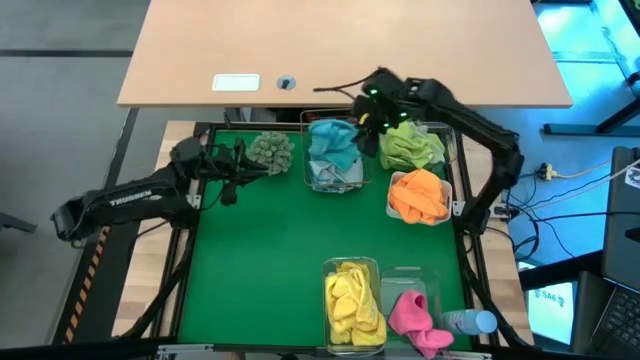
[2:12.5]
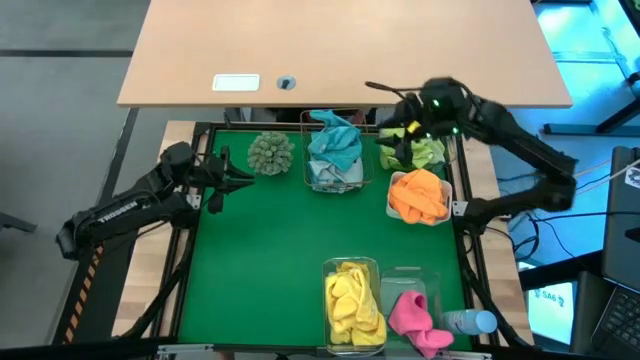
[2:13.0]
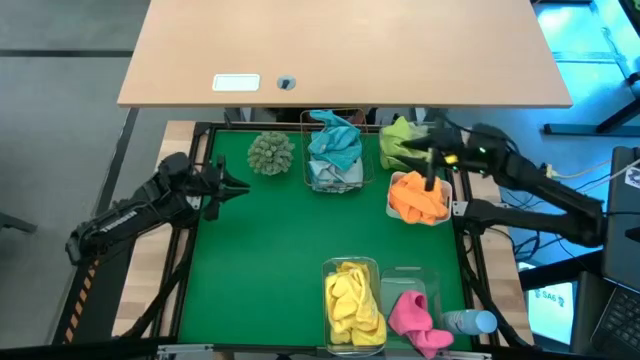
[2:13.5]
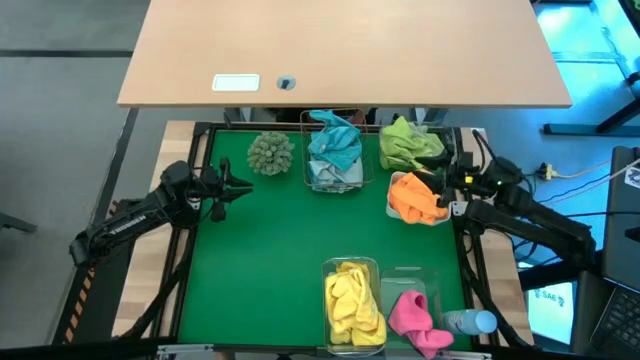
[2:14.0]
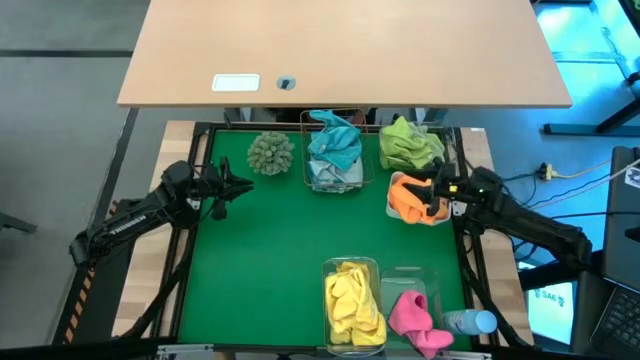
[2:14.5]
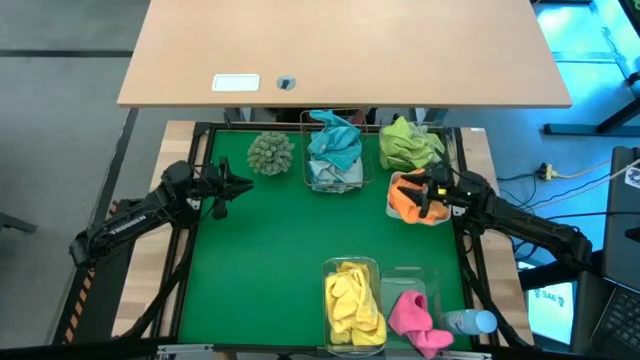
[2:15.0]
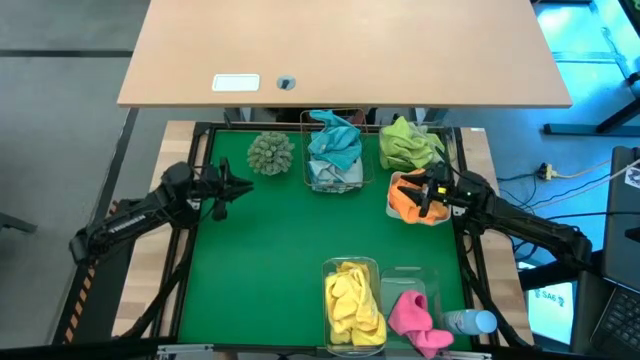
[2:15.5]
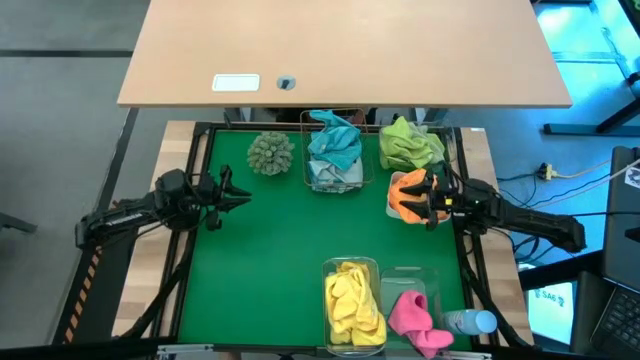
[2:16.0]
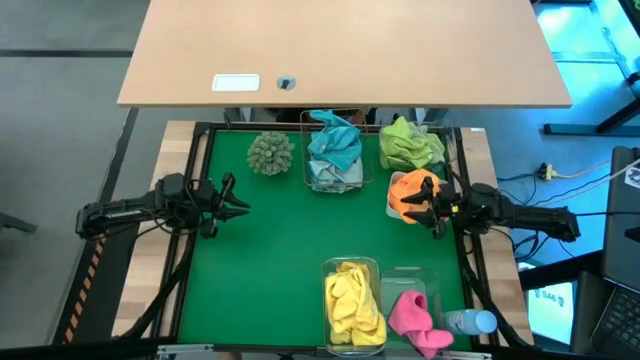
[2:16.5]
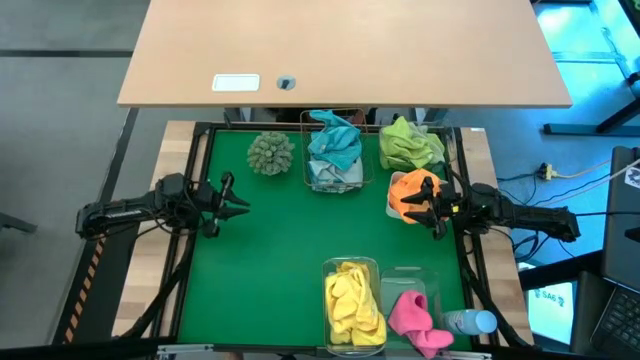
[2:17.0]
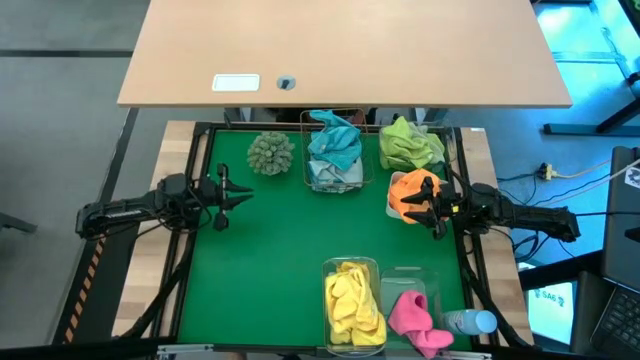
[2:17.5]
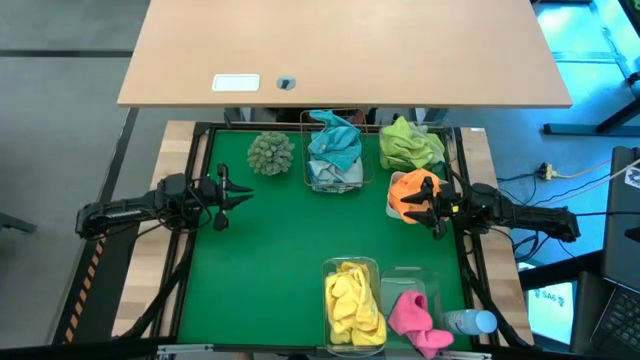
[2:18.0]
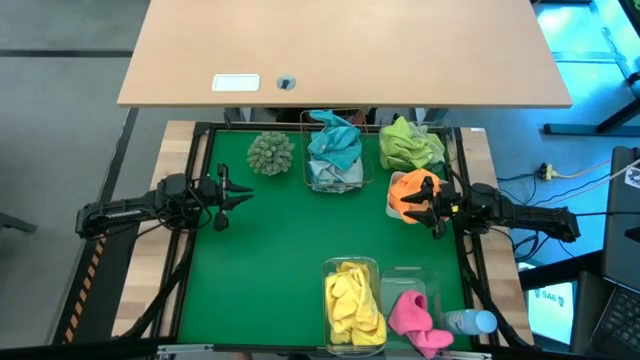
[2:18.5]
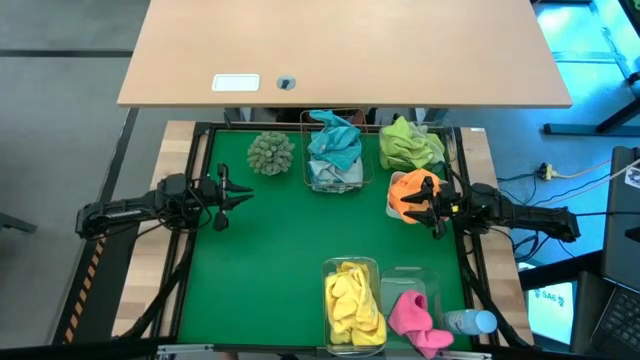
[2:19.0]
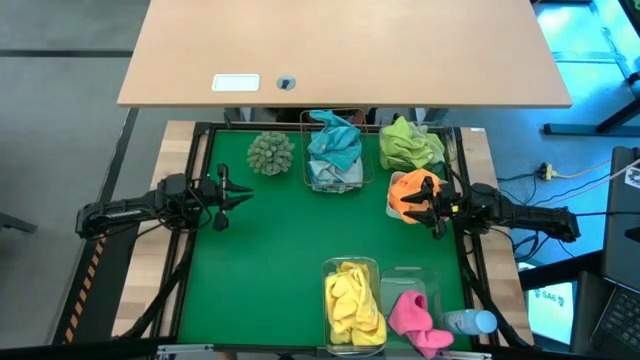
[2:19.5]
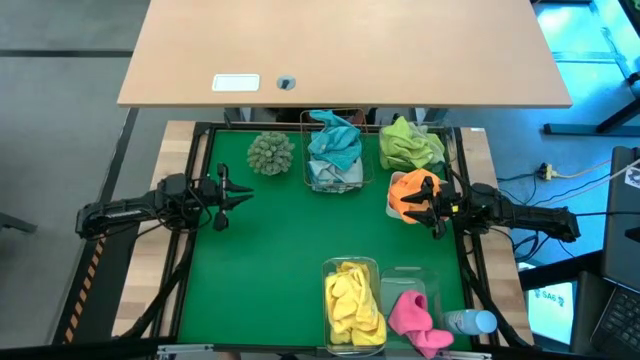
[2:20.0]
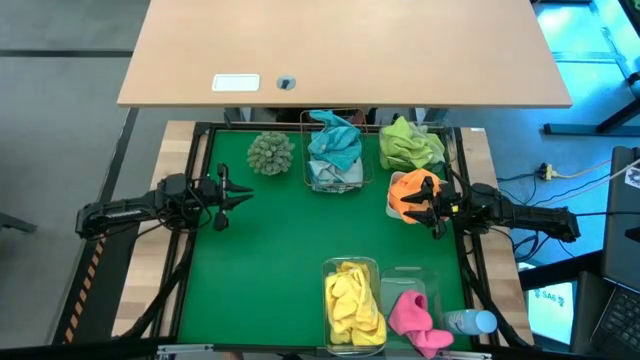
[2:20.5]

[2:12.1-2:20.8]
Task: Sort microfiber towel by color & place in baskets
Return to Home Position

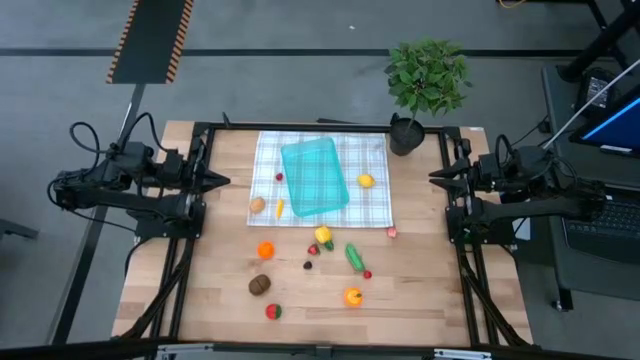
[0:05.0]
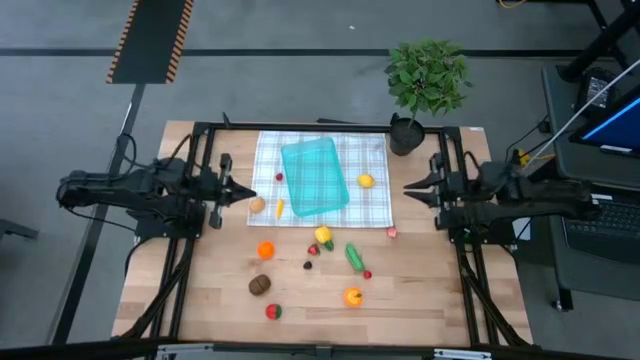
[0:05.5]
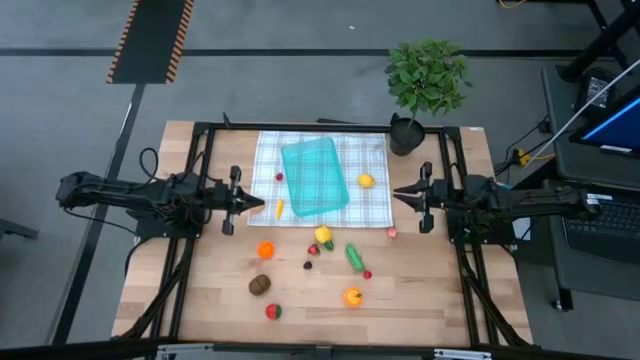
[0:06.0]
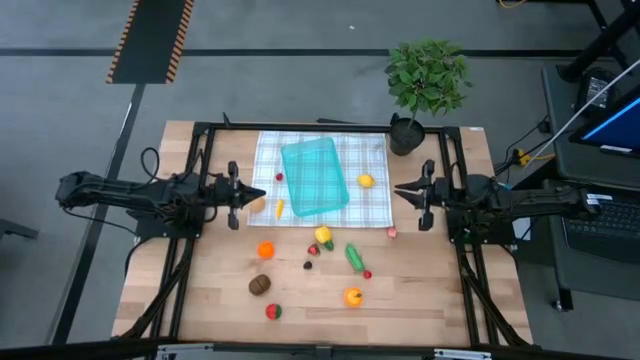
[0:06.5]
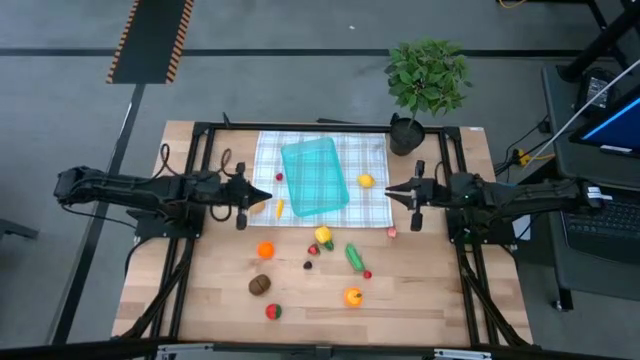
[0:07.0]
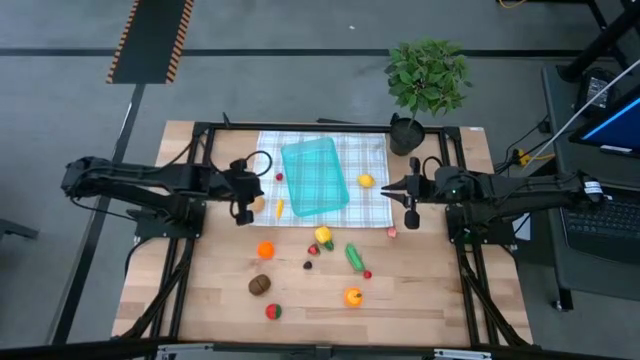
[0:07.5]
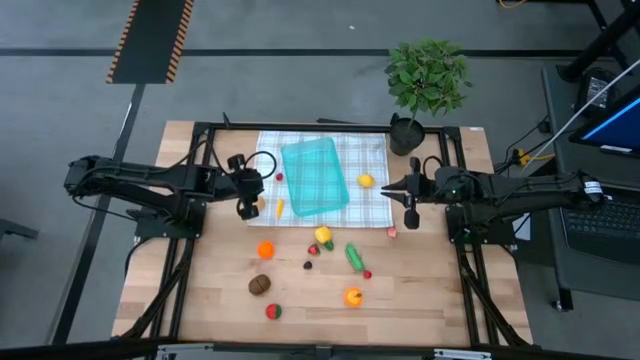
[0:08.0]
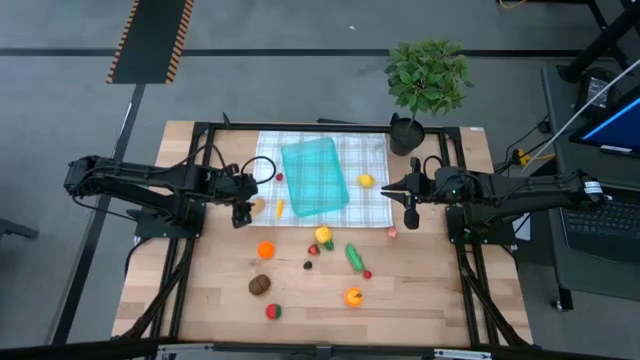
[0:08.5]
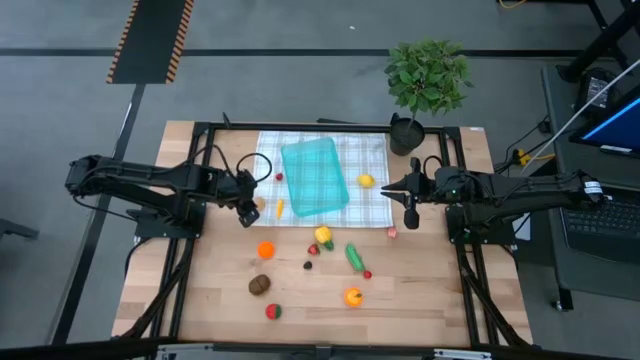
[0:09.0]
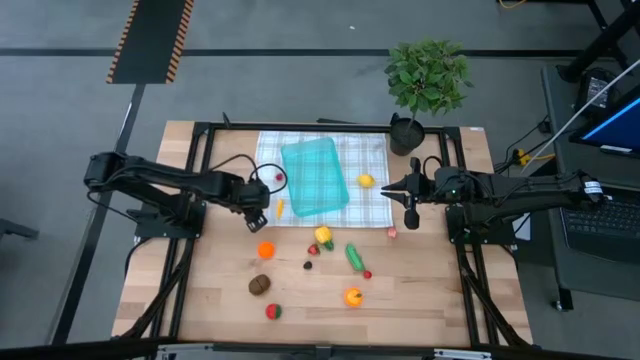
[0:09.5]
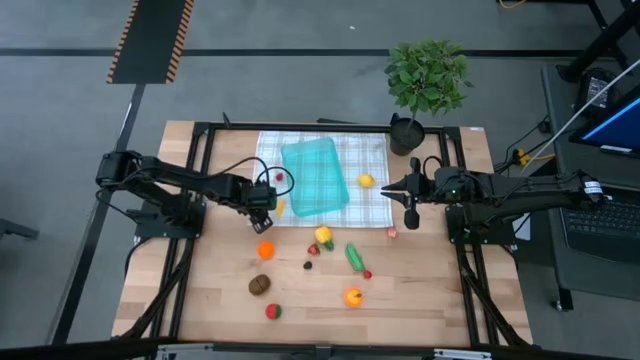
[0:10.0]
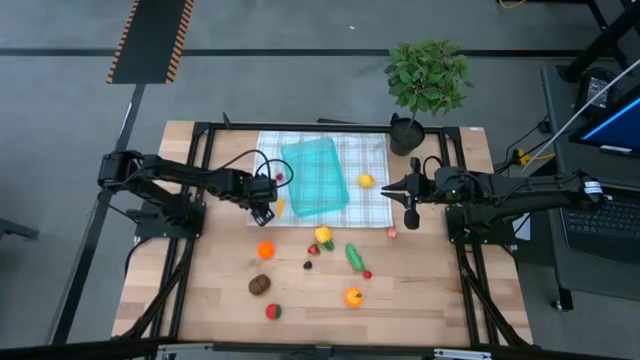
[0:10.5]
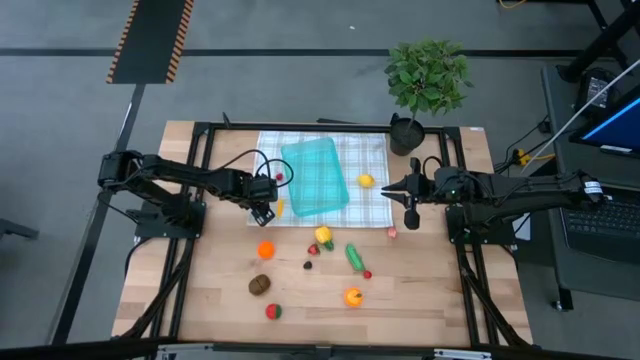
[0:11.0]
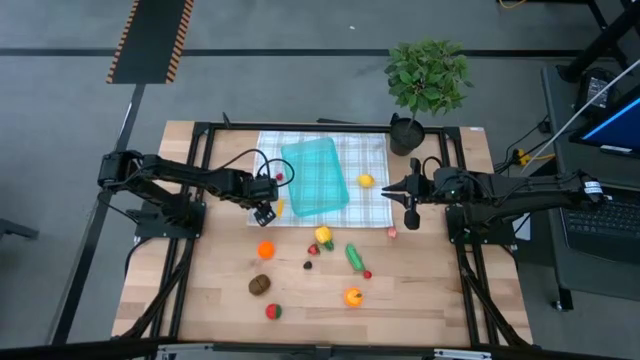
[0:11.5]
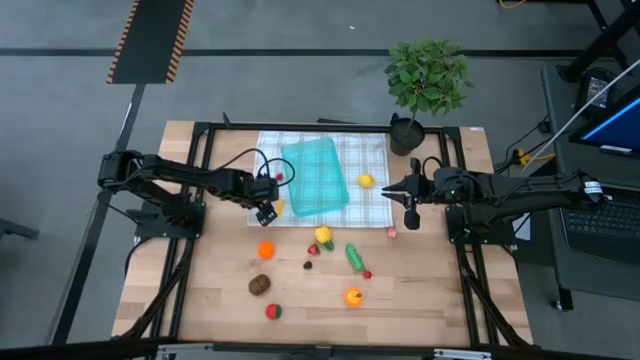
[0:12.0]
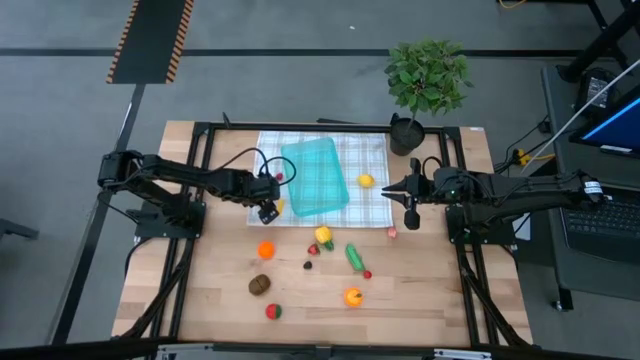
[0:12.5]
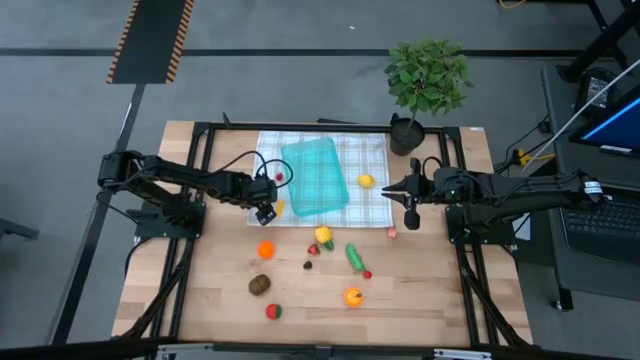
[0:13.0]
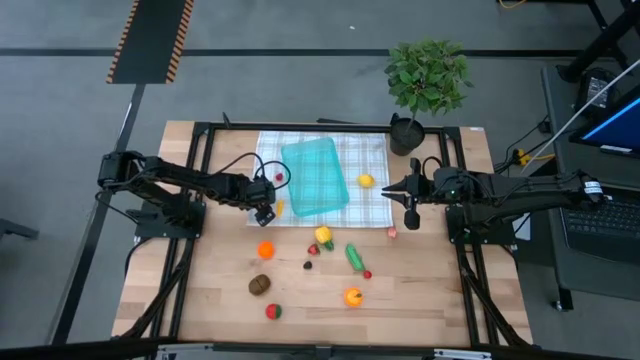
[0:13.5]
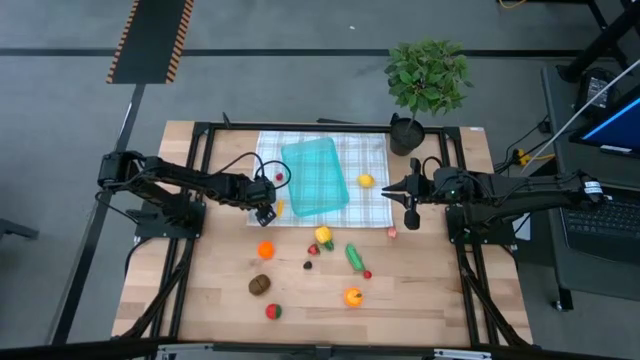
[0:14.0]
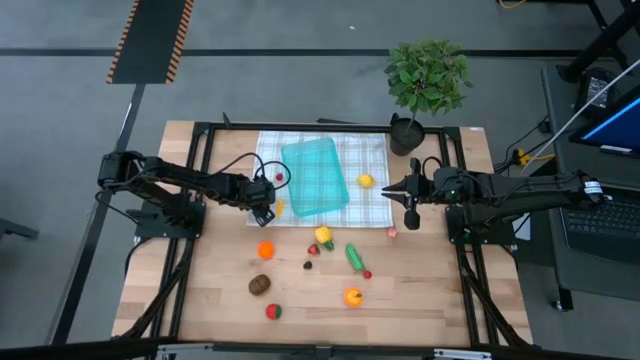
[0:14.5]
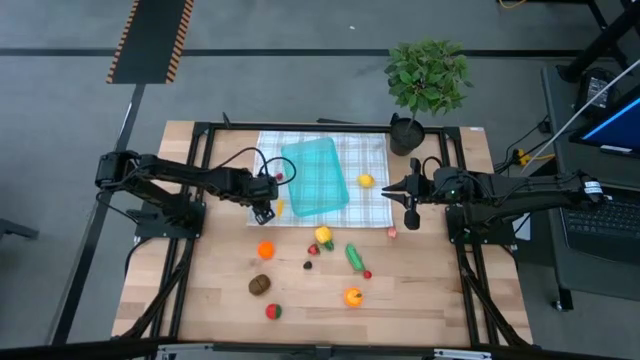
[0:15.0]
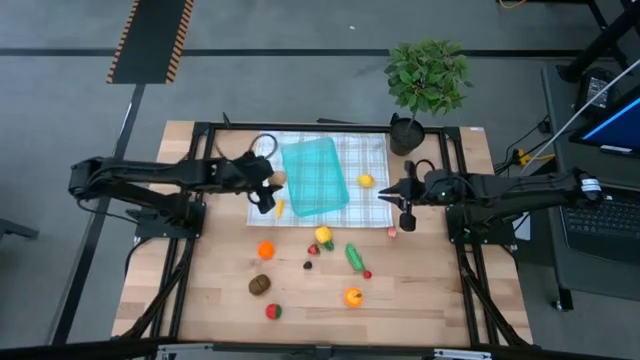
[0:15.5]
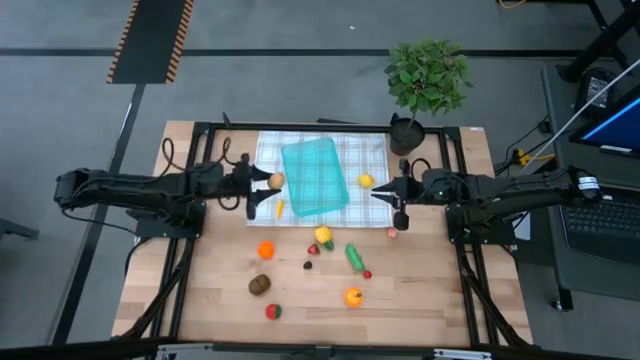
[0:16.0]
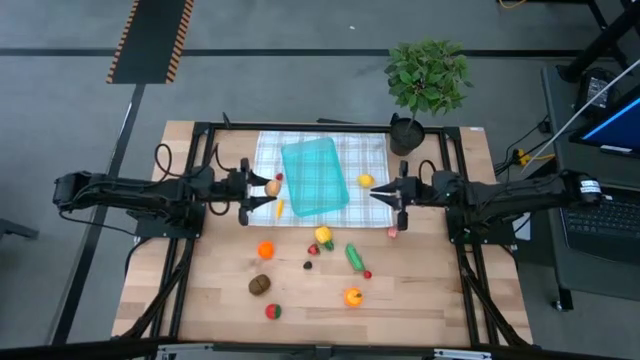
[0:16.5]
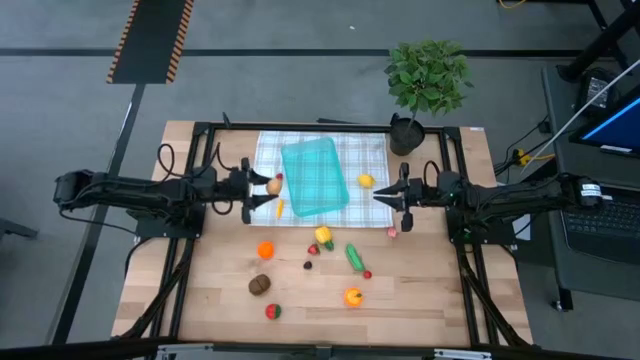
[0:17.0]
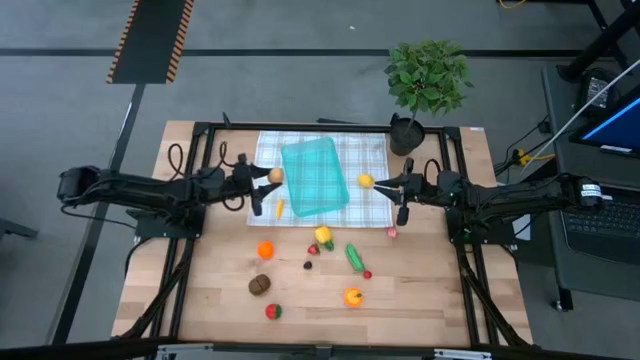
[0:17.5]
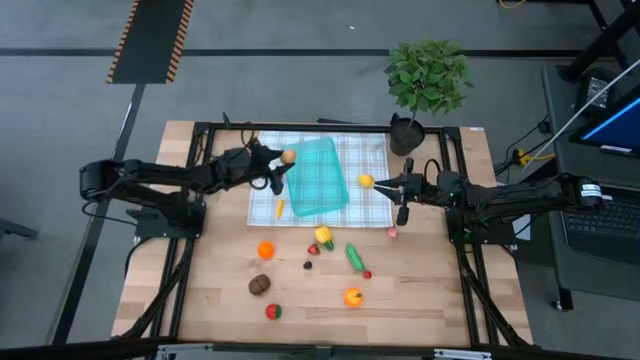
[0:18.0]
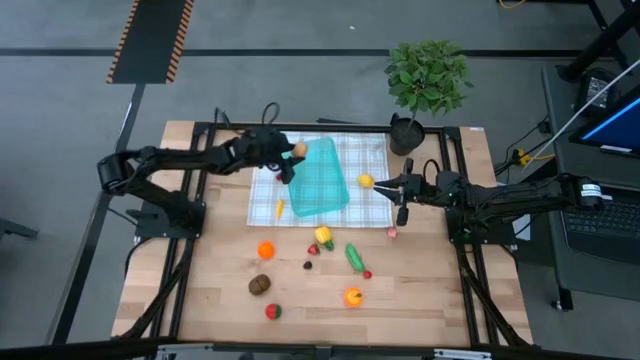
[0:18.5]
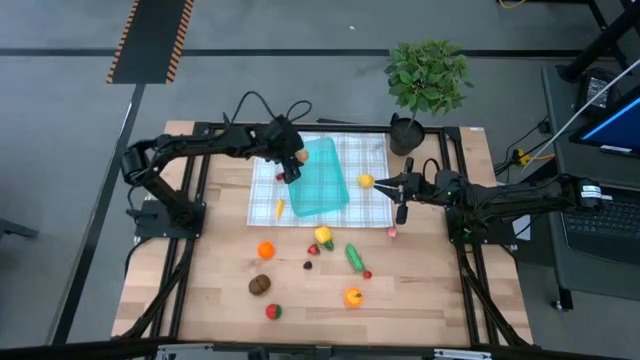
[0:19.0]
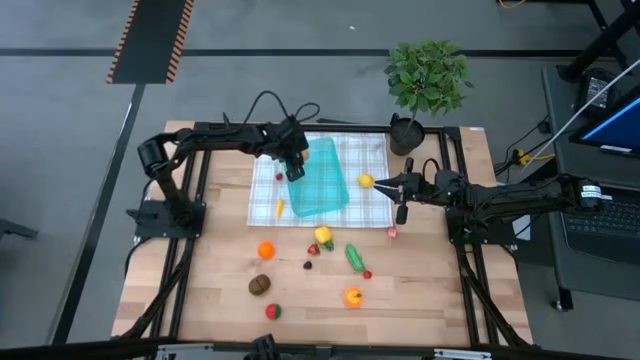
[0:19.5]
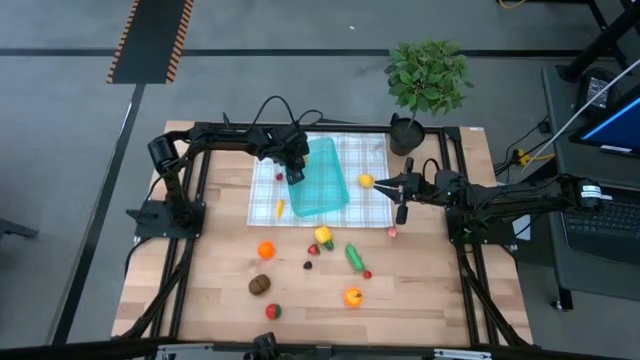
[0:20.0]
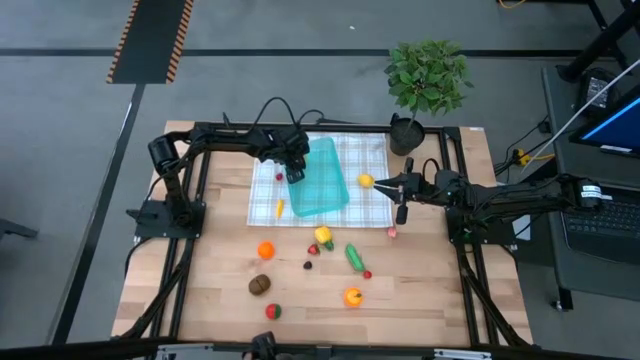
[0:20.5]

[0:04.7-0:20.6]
Task: Pick and placing Produce into tupperware
Put the brown potato into the blue bin
